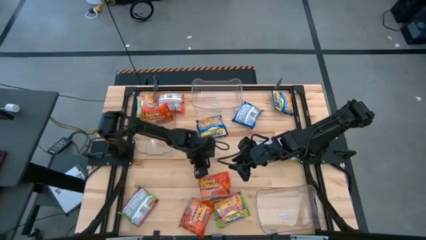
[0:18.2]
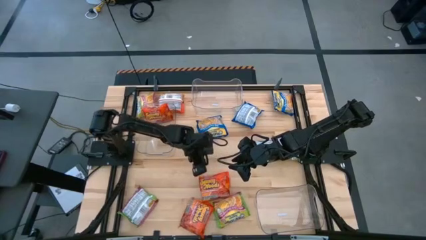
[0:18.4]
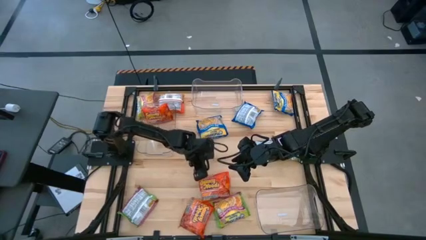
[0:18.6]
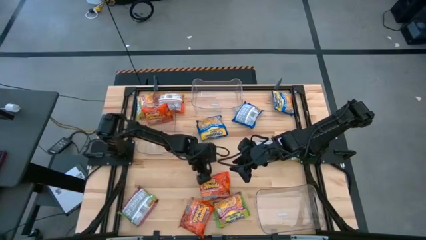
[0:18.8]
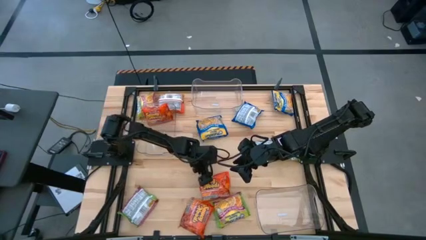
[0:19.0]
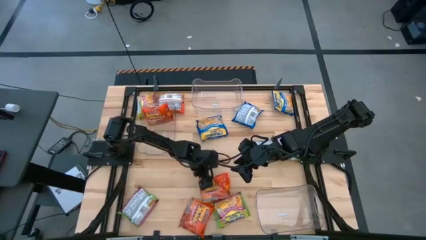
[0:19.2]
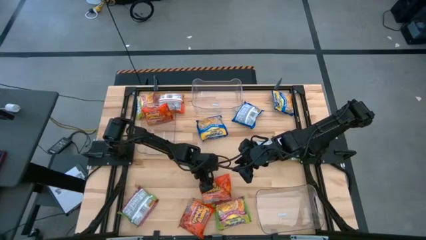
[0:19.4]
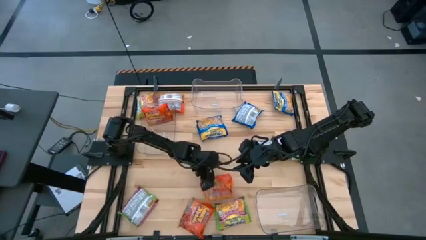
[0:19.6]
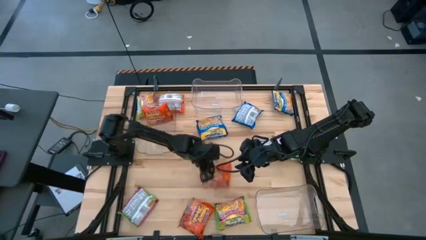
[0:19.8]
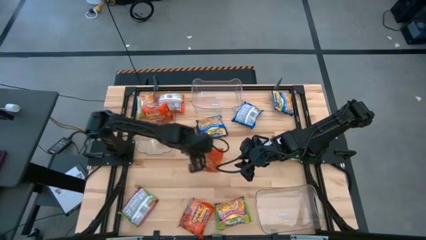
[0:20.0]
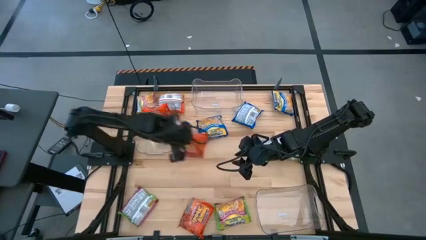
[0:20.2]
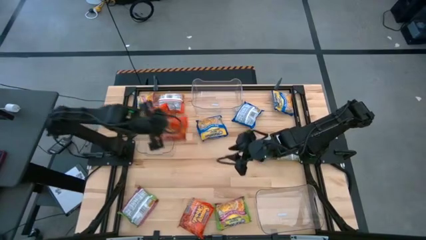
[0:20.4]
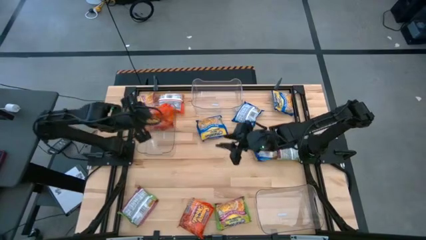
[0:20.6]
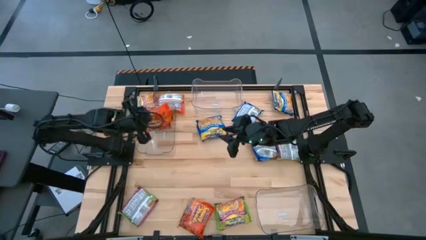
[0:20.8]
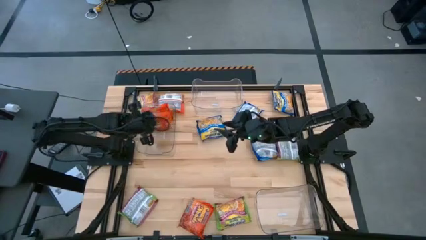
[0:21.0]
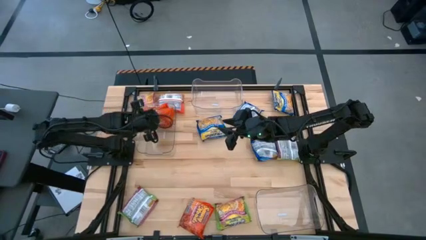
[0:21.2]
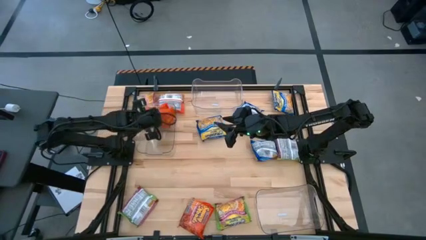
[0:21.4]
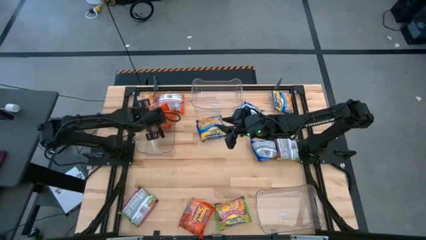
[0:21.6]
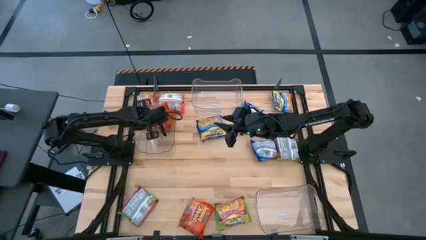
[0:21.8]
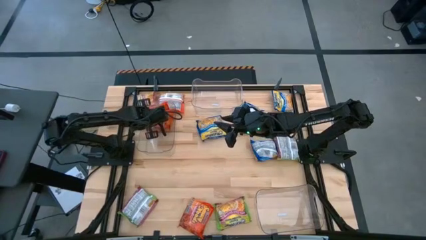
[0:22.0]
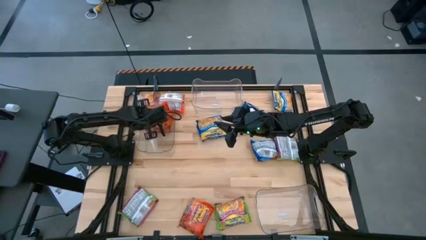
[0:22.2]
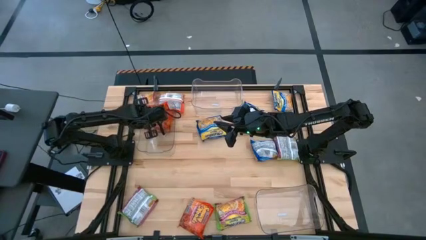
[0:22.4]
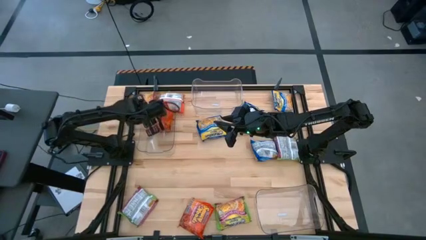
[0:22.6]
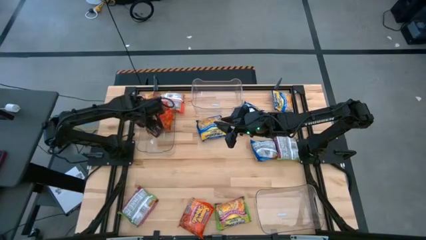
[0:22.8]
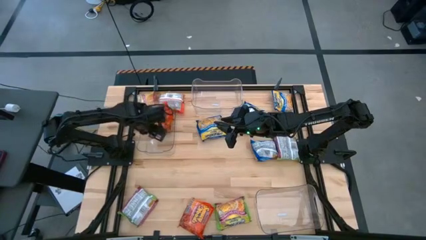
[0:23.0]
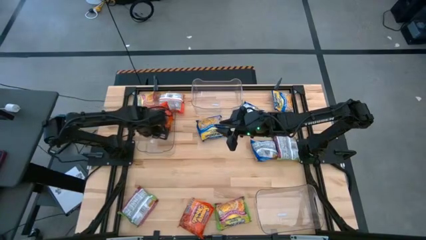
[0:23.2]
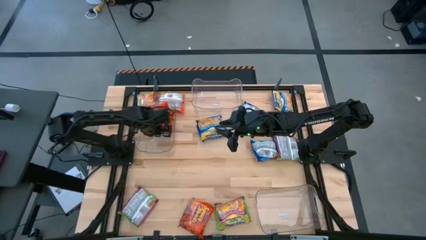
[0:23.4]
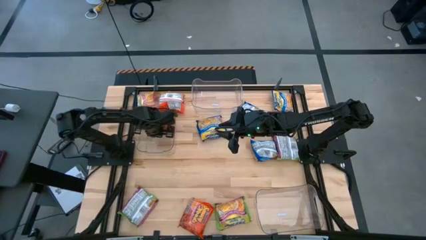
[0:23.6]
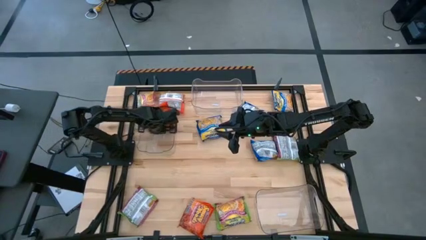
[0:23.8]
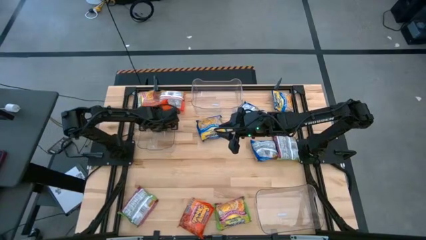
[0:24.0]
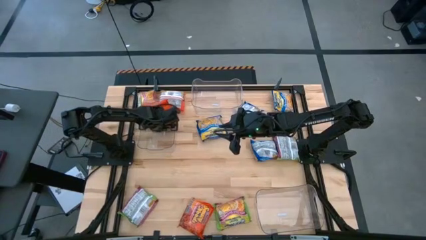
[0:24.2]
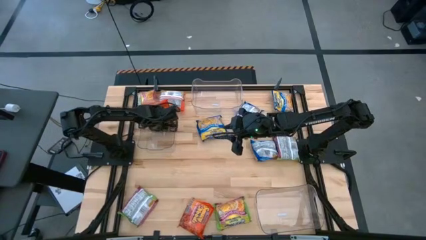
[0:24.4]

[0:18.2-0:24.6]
Task: Sort Maruchan noodles
Put the orange noodles into the left transparent bin

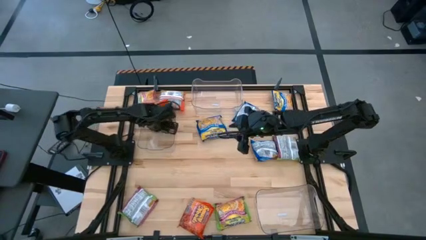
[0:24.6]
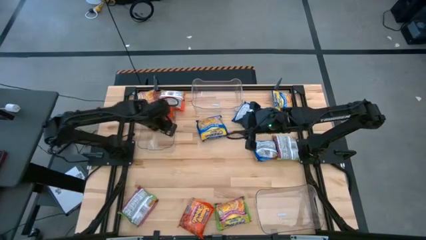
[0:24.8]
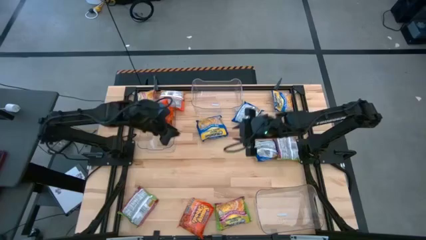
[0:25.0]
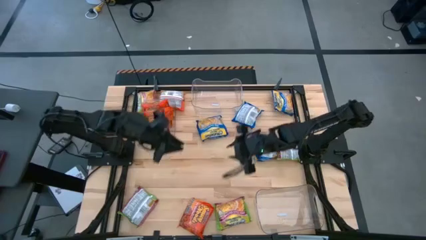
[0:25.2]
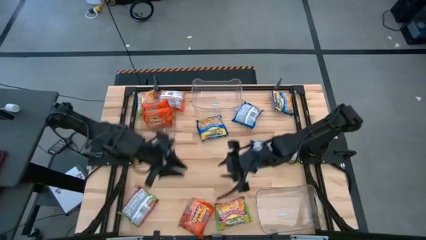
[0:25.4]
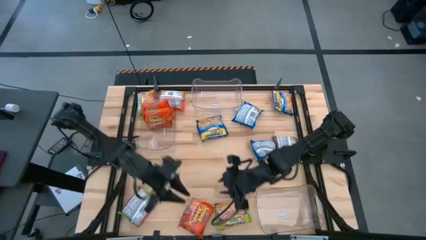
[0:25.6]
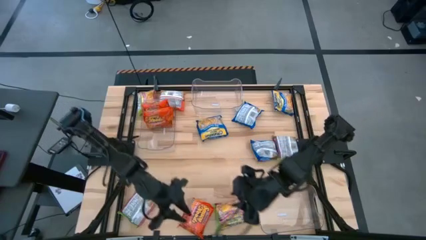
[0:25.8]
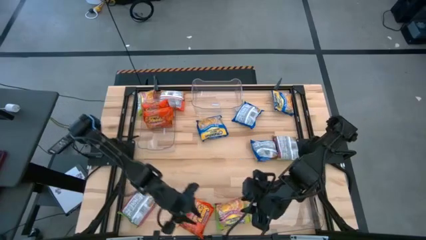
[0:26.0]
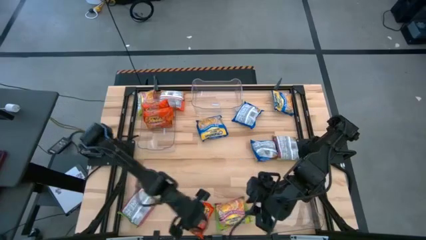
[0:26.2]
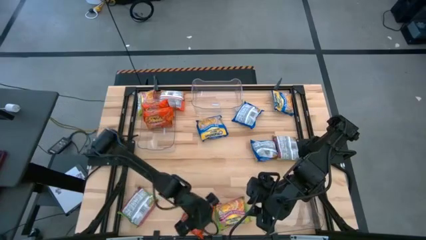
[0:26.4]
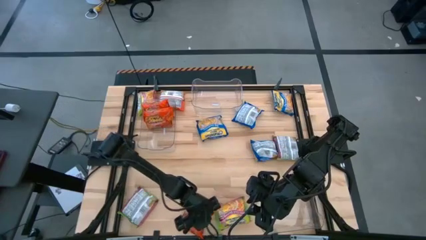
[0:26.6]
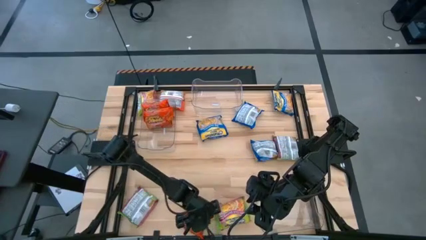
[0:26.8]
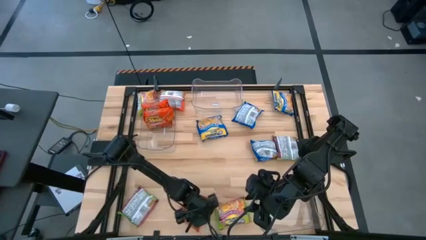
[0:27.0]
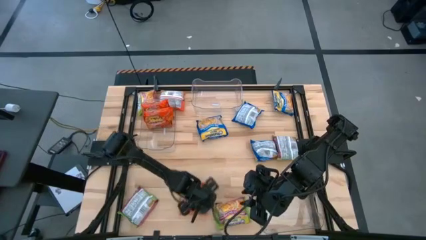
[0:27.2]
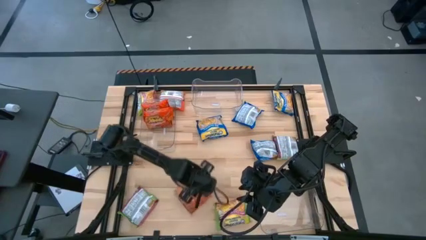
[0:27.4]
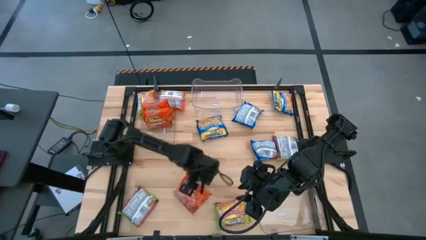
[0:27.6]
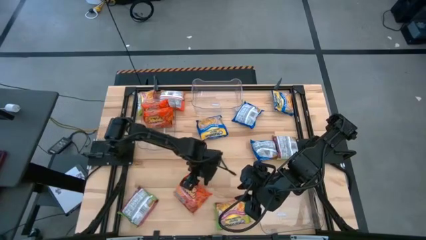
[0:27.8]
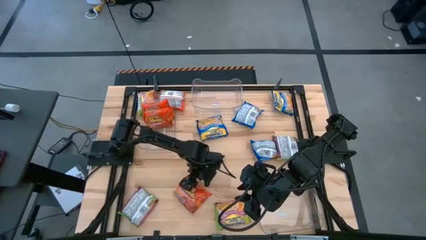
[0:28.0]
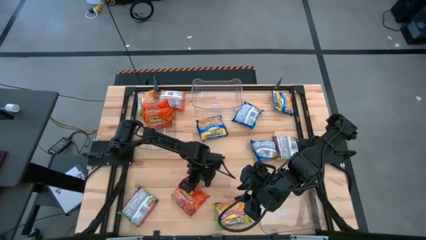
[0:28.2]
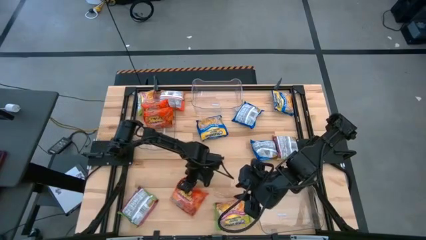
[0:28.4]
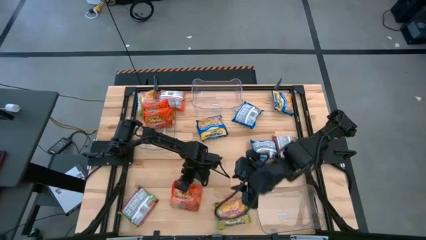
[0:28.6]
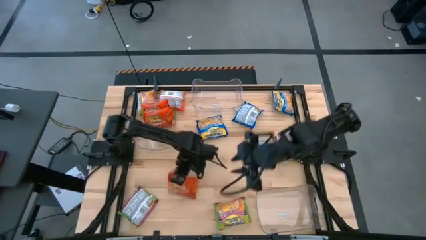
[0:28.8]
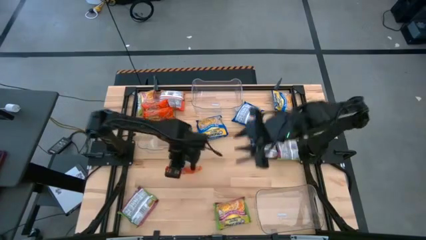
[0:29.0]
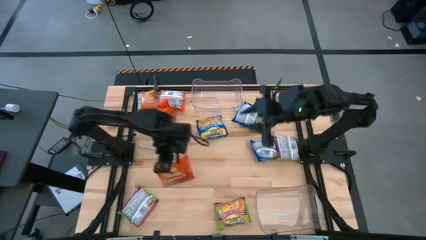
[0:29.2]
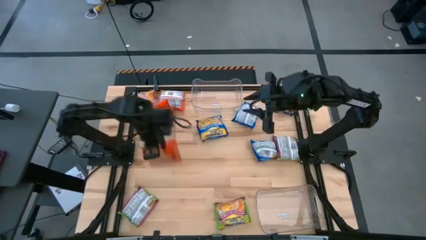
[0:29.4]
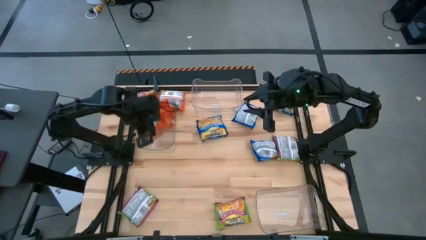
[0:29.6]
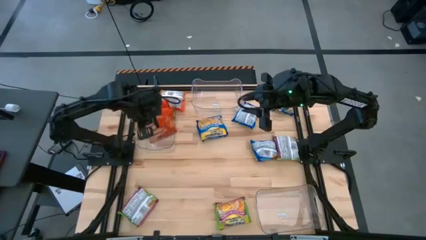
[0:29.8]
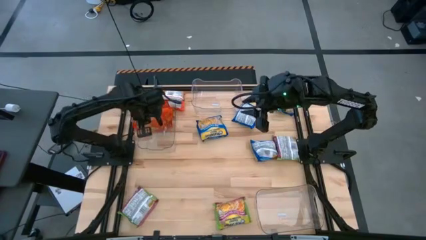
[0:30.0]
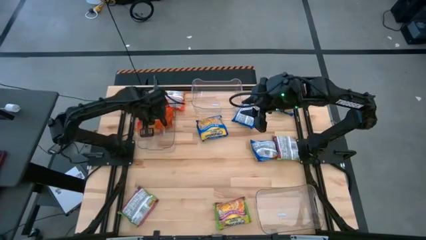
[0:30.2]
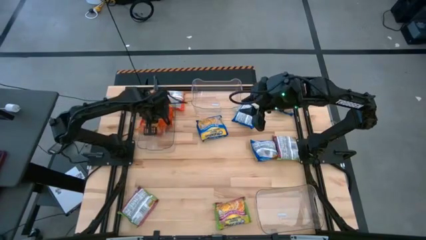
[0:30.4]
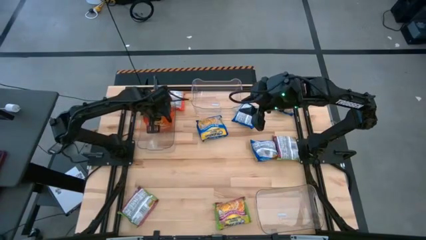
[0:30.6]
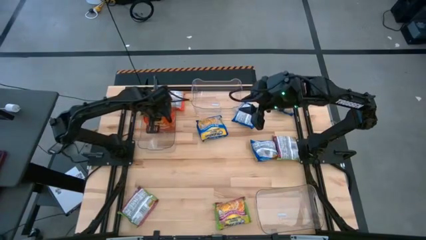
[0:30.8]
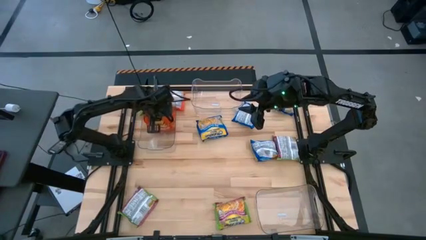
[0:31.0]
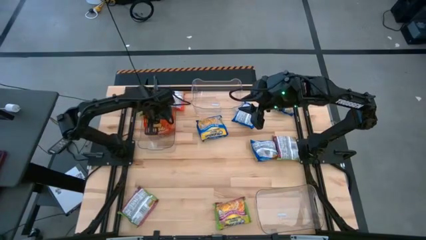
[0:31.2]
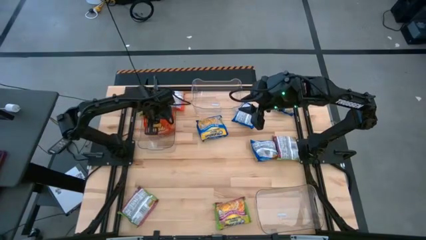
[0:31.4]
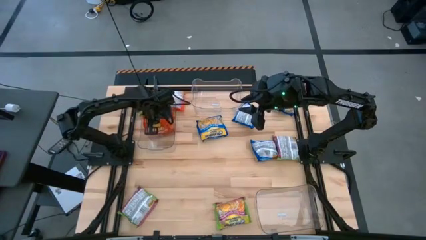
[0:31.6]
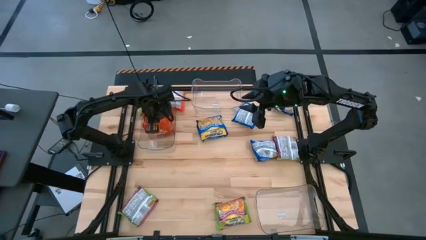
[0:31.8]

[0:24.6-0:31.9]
Put the orange noodles into the left transparent bin

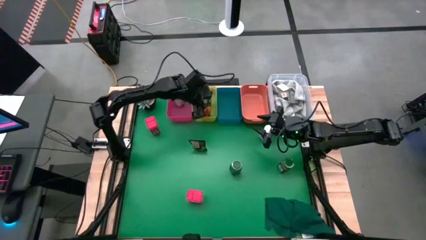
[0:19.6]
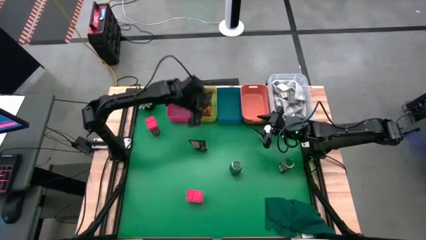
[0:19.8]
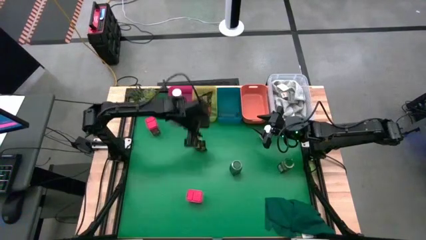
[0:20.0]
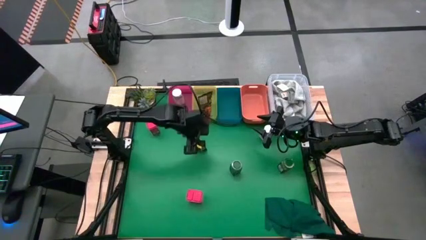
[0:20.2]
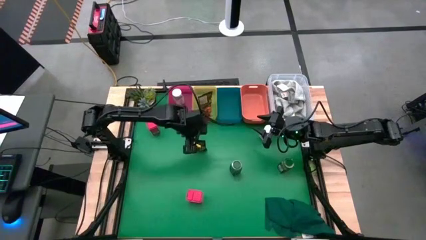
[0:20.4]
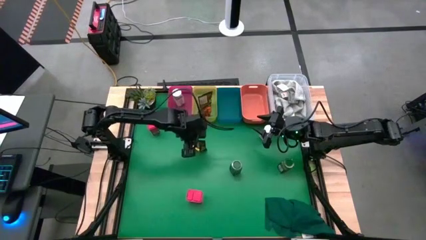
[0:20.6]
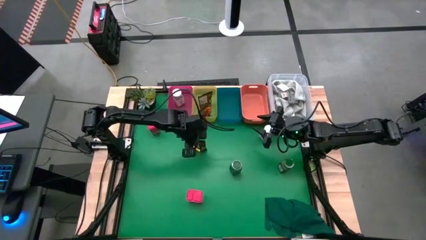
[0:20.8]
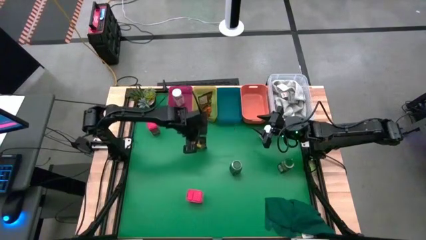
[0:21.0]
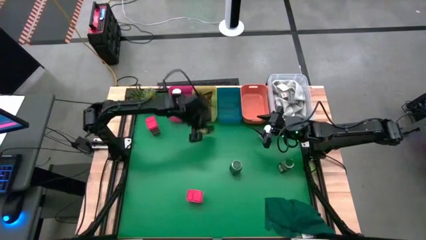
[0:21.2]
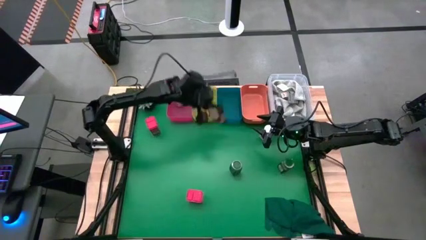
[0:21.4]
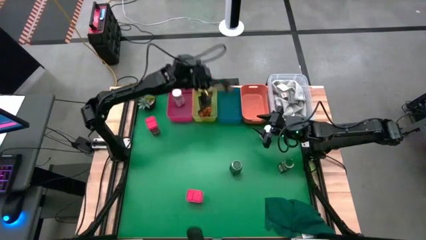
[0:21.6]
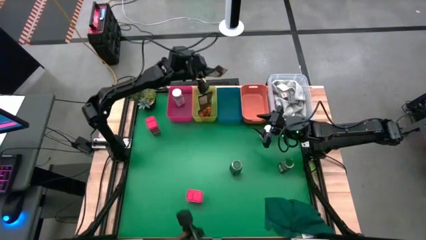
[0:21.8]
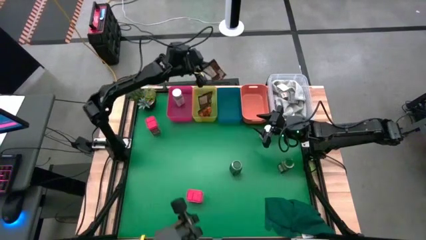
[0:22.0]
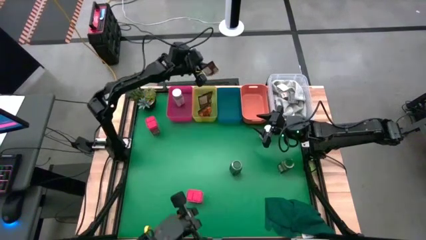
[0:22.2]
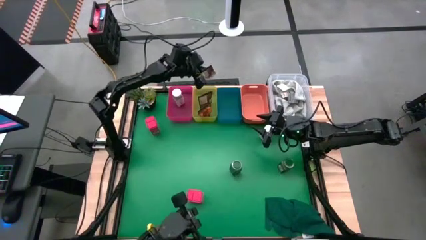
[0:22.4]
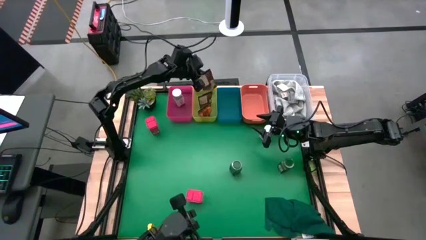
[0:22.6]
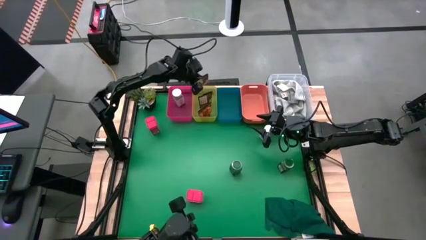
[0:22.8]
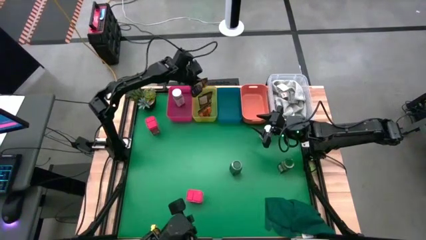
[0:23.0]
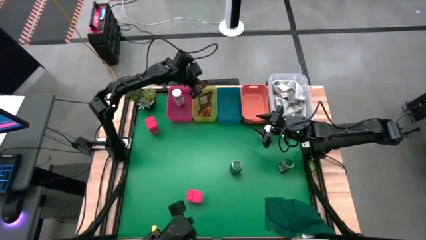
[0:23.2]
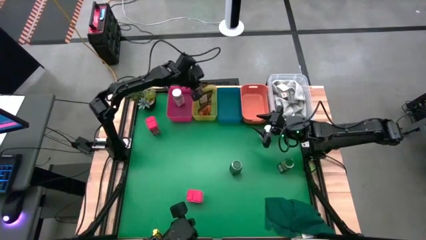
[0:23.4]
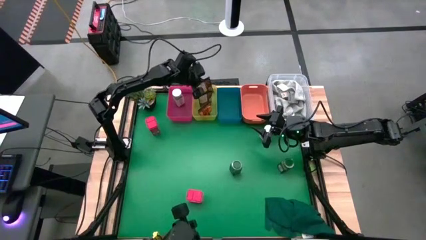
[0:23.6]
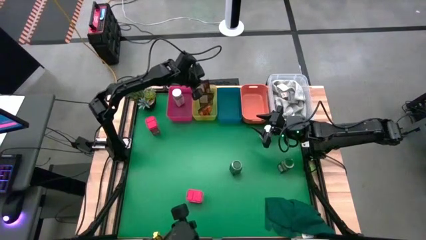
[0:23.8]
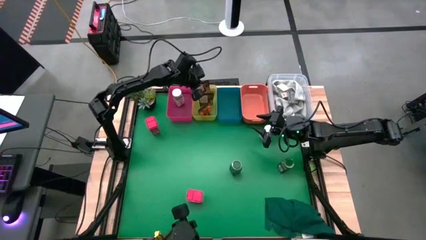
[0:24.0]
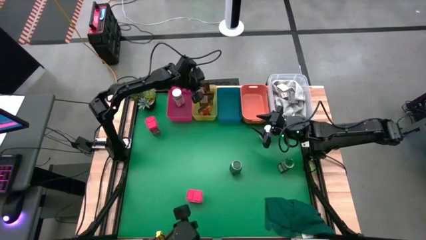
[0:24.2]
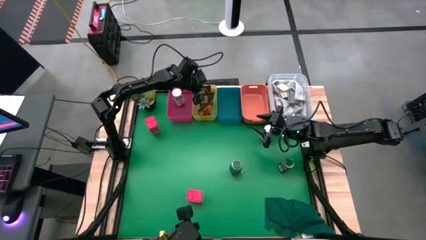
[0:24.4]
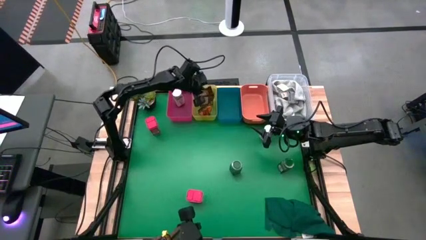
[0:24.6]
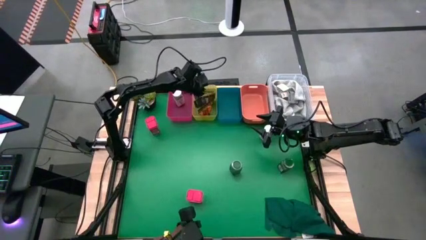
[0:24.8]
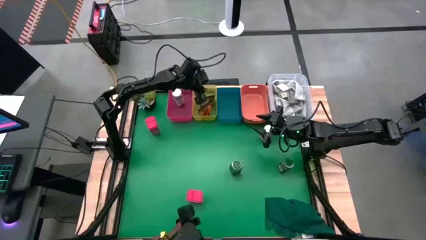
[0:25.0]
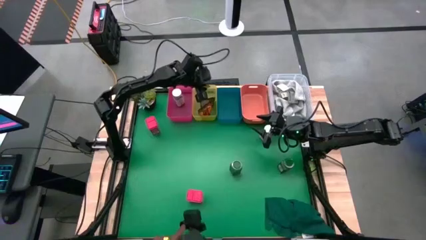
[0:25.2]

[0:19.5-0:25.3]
Task: Sort spices by type
Put the brown seasoning pack into the yellow bin
